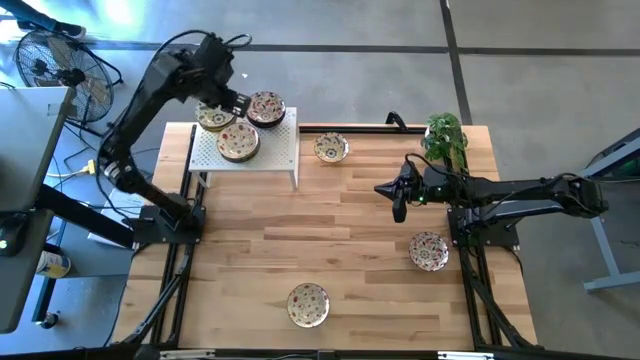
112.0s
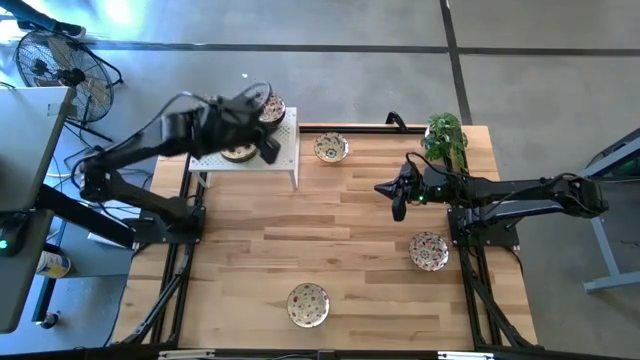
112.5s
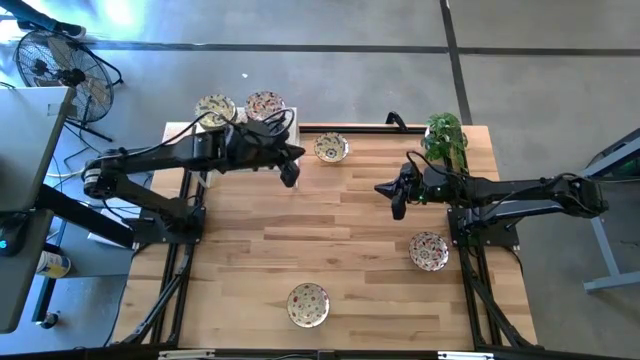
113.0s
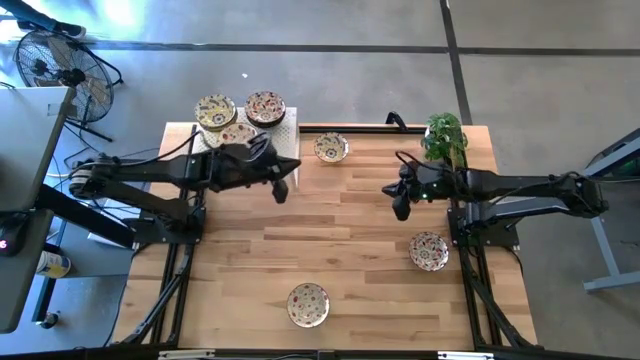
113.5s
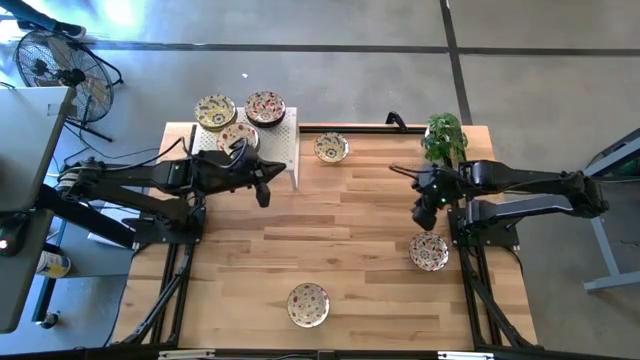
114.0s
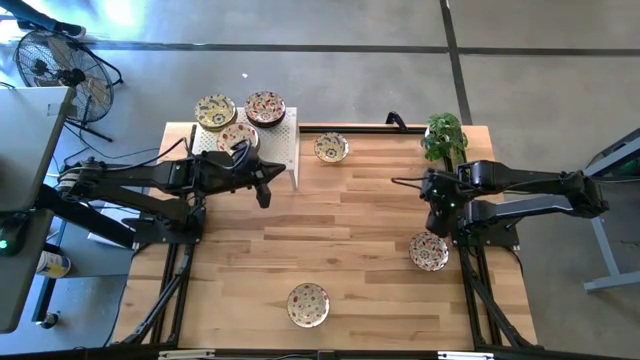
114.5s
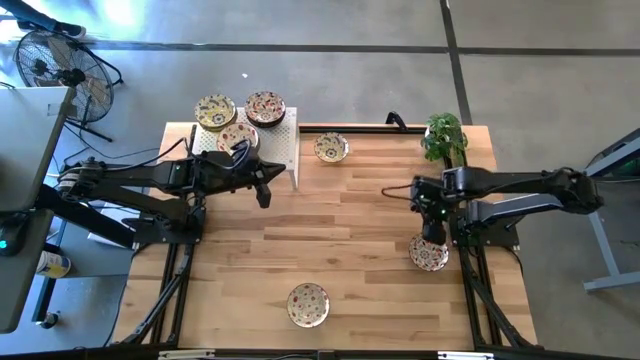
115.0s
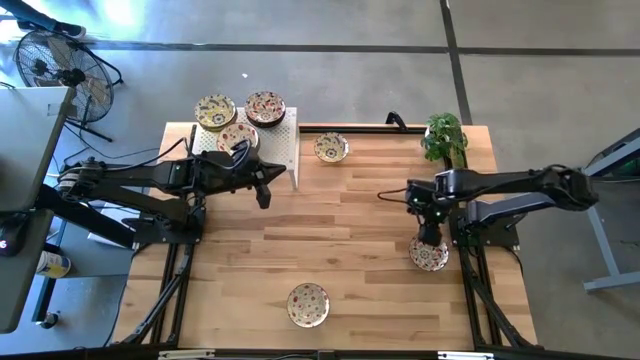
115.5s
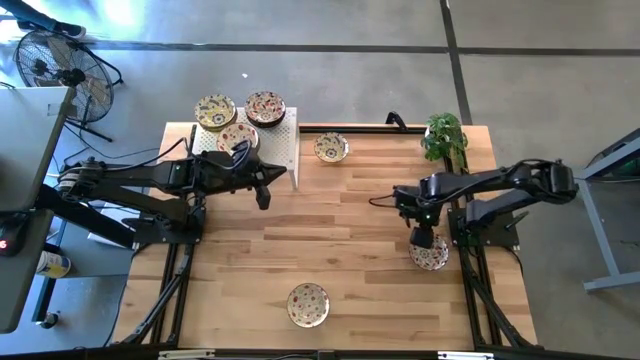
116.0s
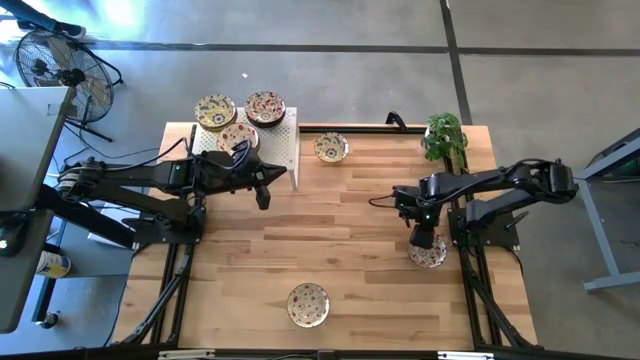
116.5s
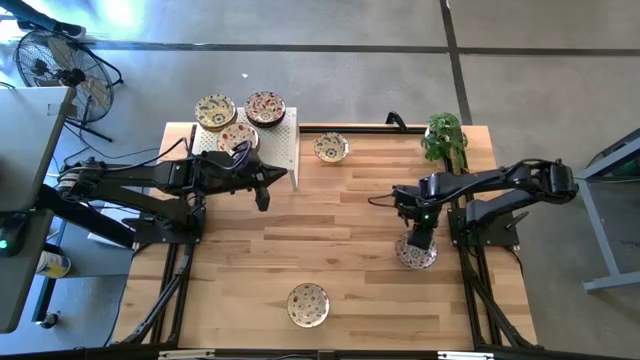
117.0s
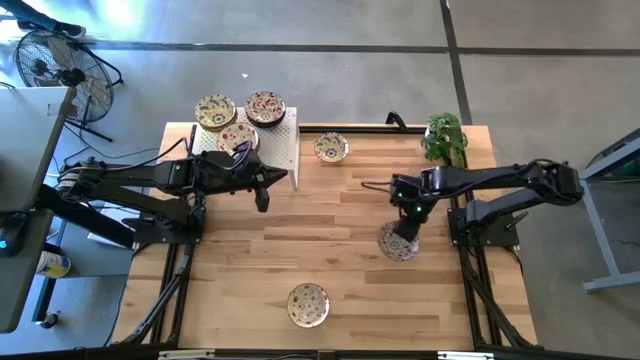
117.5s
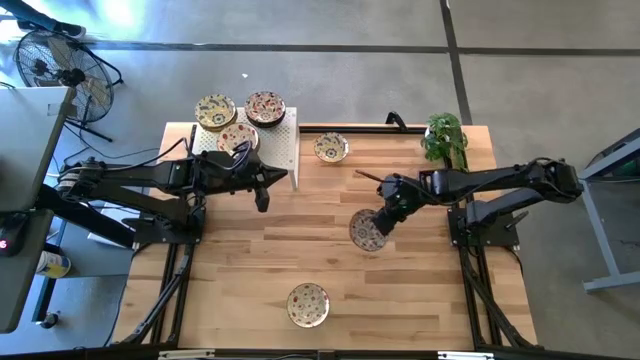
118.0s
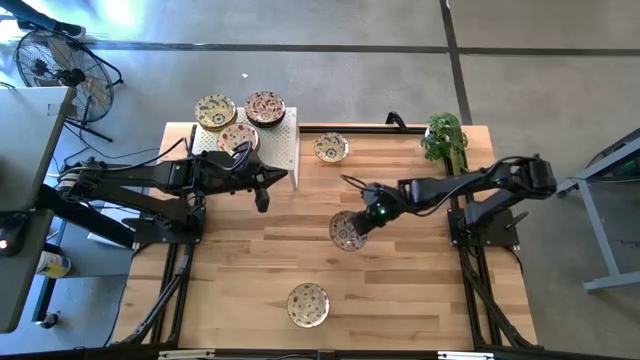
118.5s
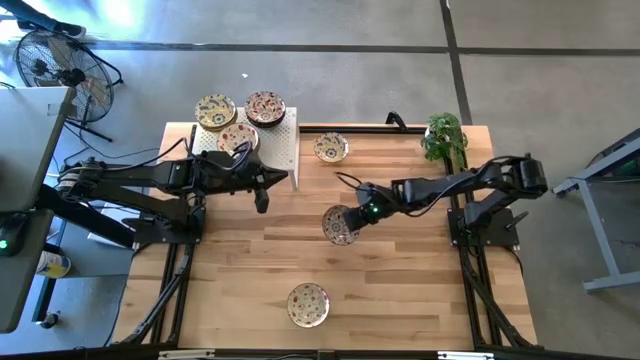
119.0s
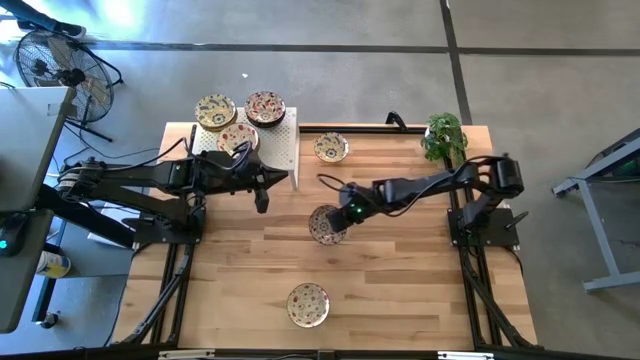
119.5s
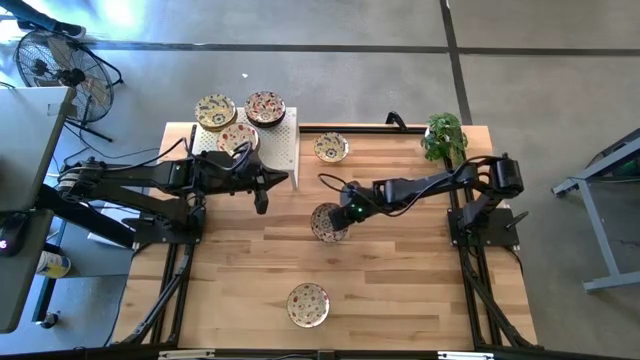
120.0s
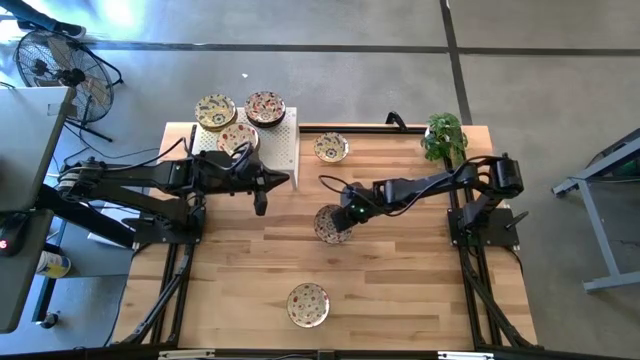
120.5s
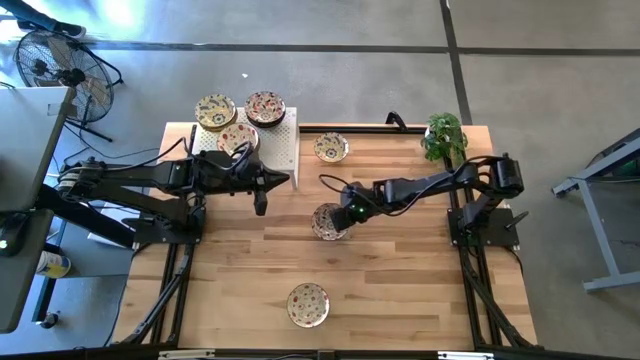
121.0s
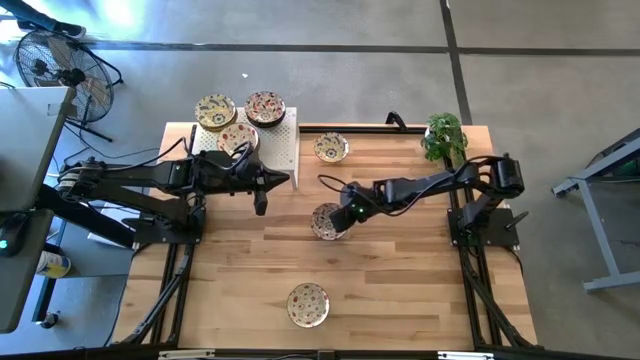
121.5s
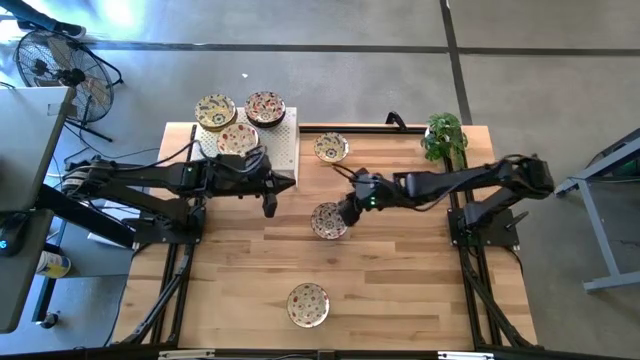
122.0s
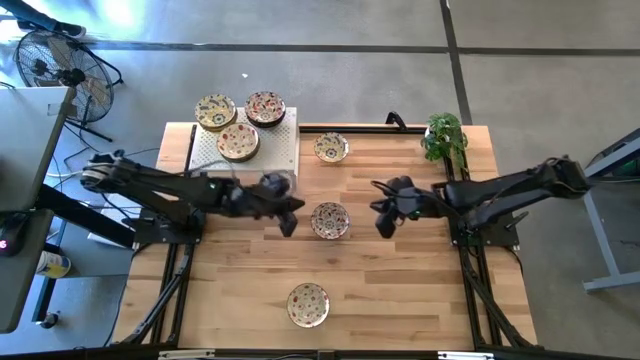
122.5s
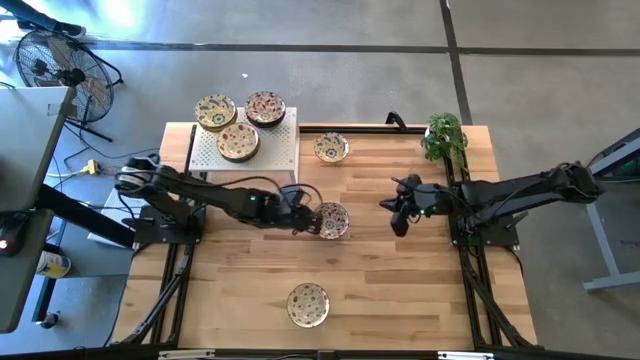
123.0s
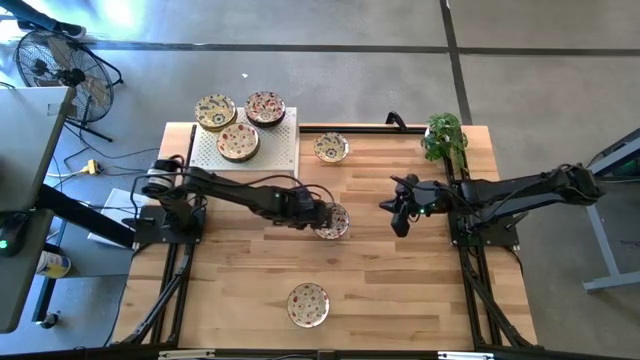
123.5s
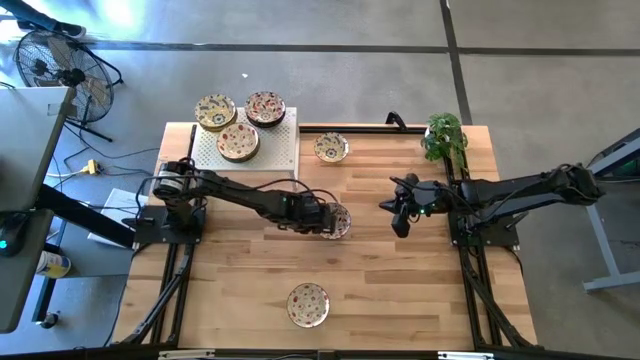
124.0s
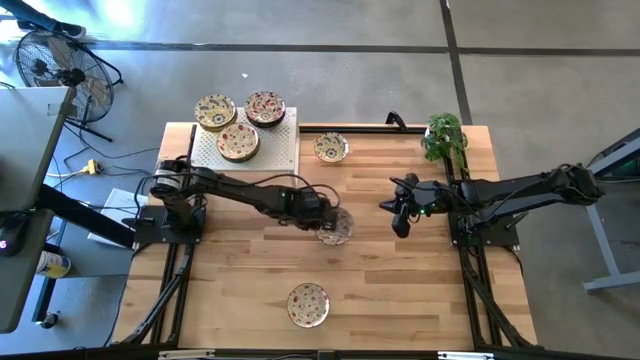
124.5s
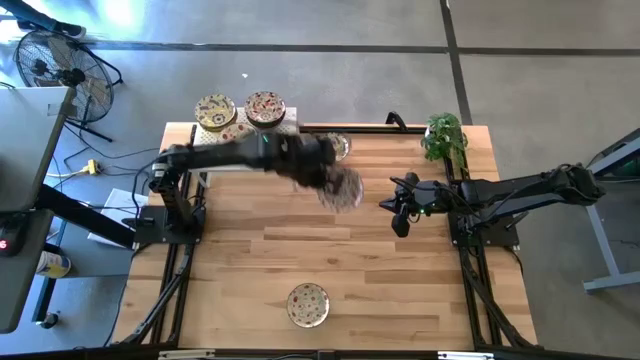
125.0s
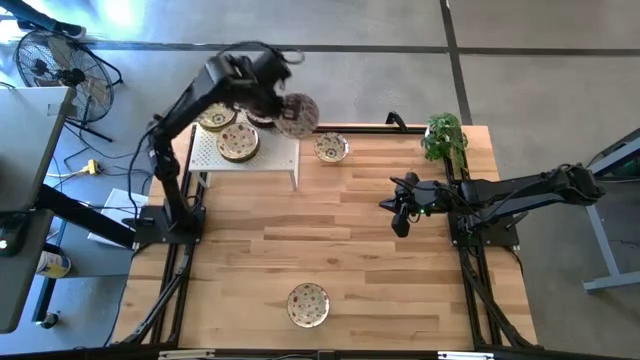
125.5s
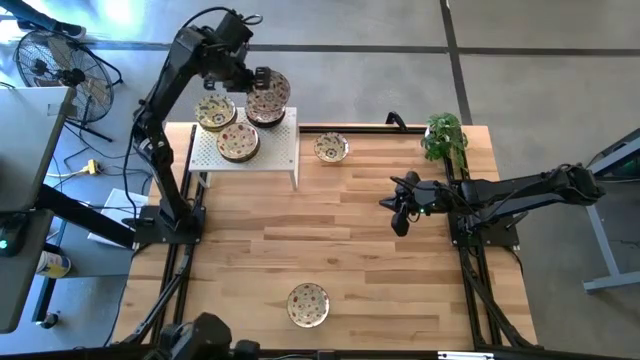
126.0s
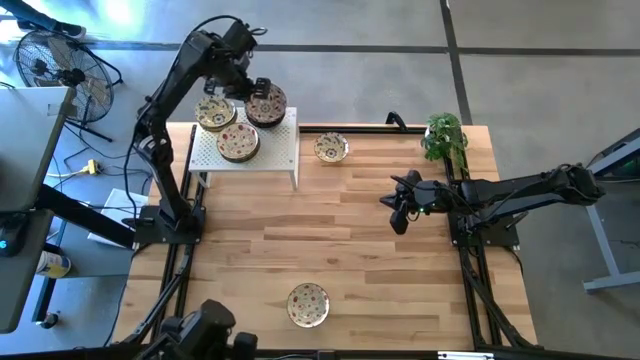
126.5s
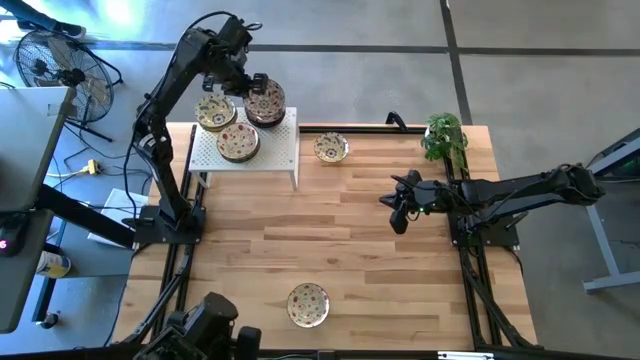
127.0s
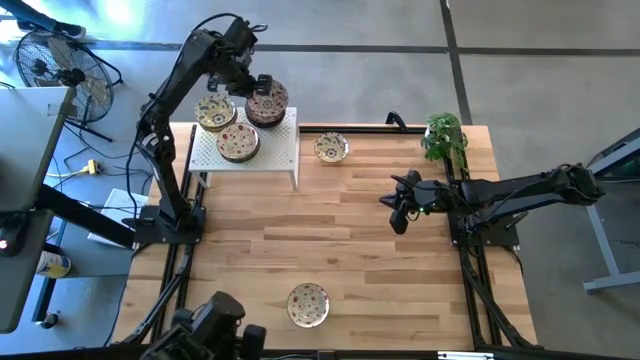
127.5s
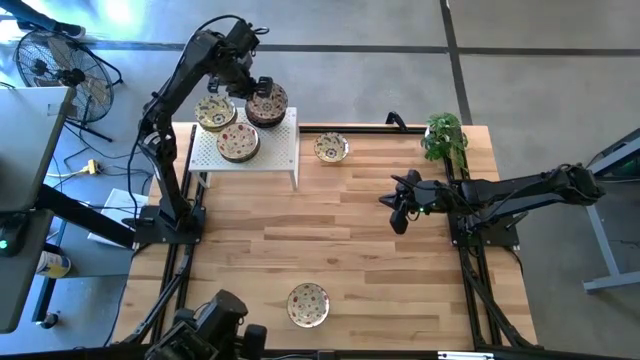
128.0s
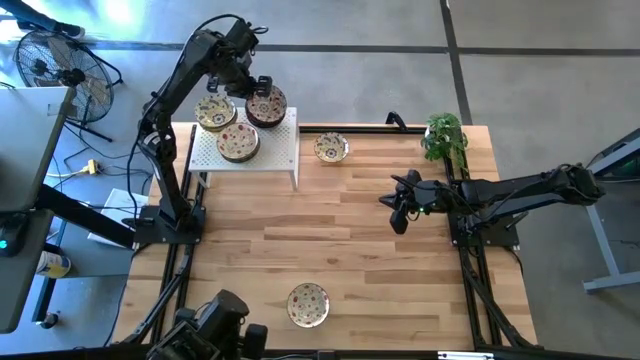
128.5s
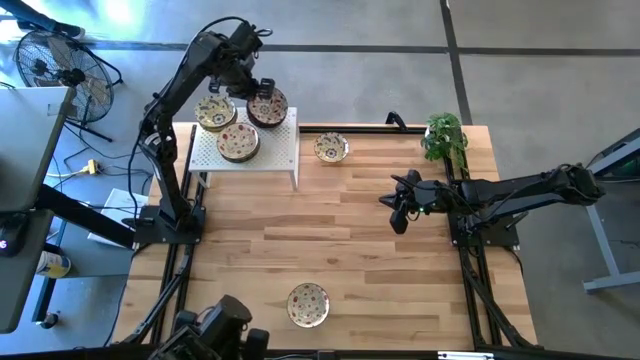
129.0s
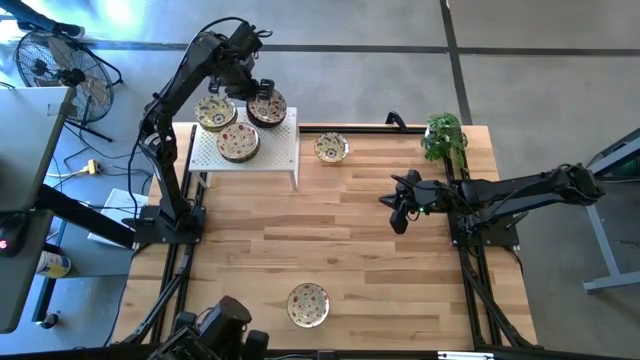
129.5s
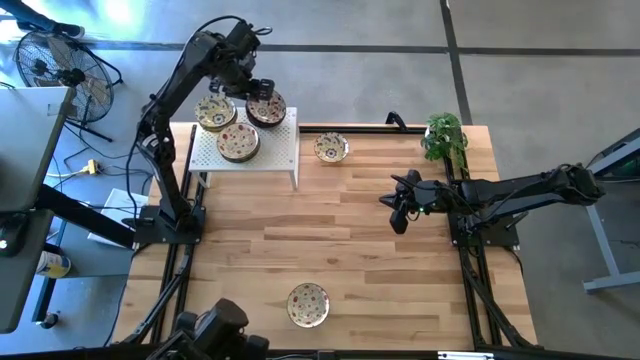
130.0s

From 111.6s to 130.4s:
Task: Pick & Place Mini bowls
Stack the blue patterned bowl on the stacked blue patterned bowls on the shelf

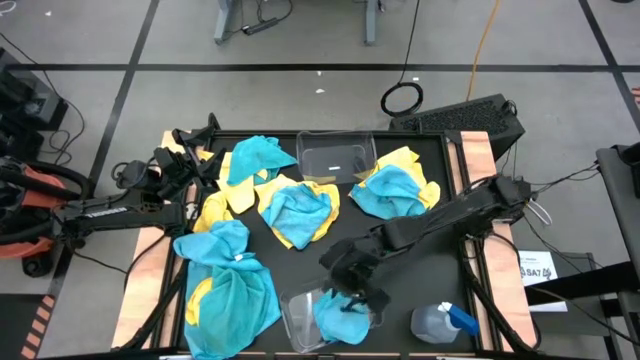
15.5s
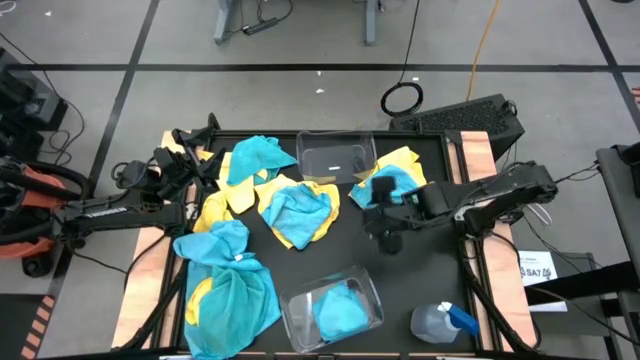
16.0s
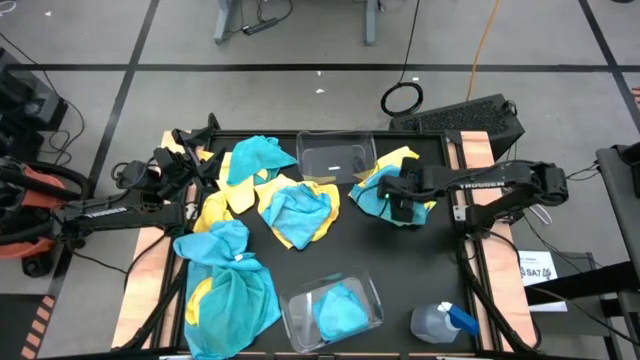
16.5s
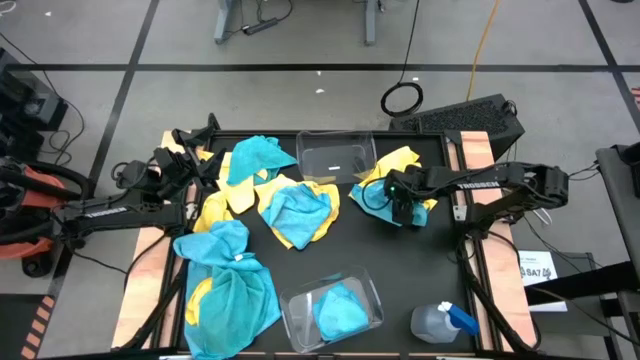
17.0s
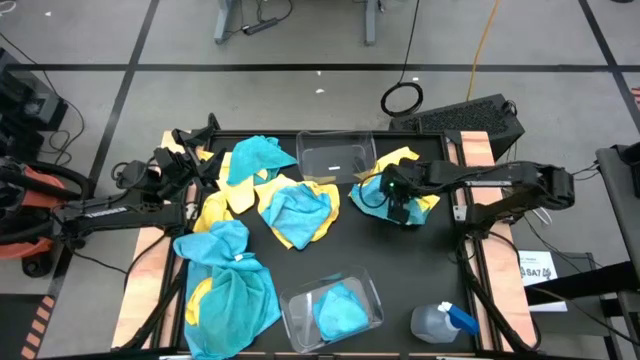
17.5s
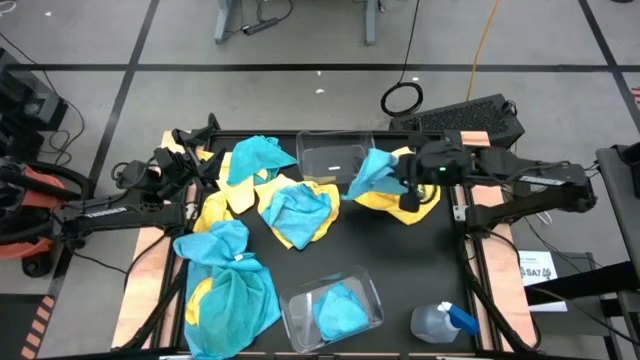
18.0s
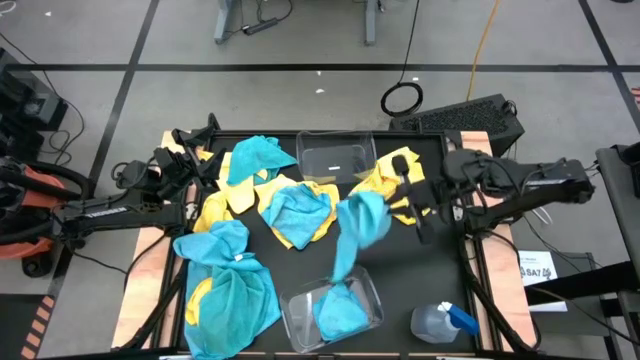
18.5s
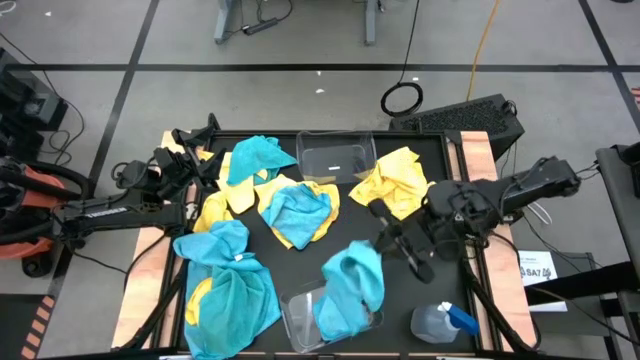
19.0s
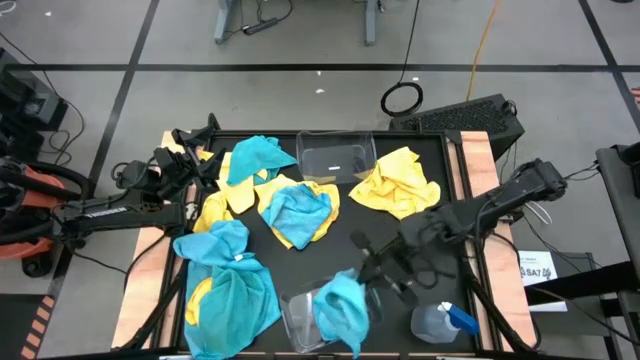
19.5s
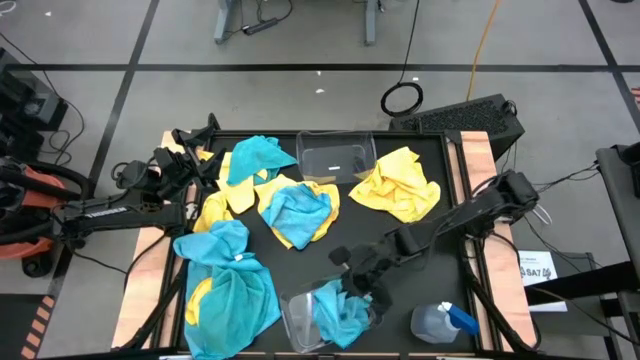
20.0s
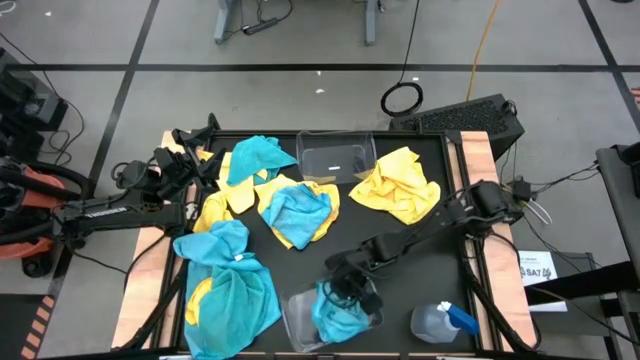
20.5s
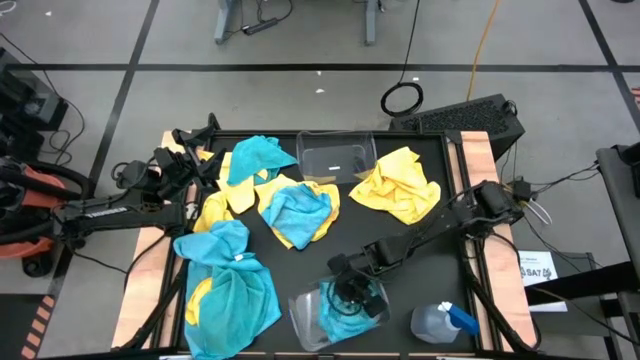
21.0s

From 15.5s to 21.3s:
Task: Sort microfiber towel by color & place in baskets
Put the blue towel into the bottom transparent bin
